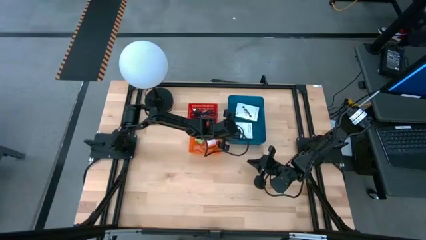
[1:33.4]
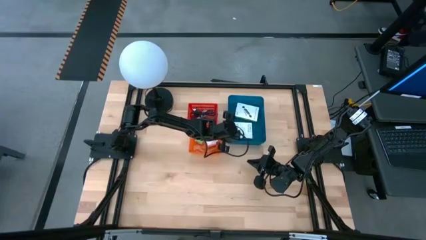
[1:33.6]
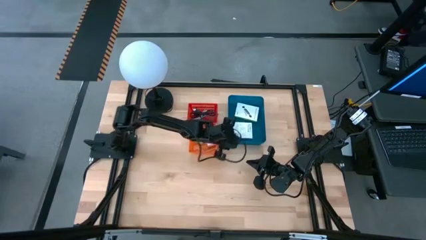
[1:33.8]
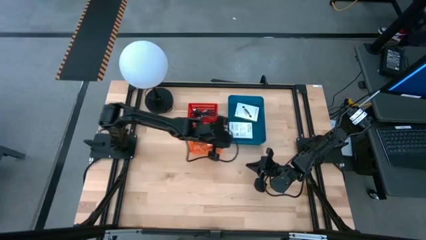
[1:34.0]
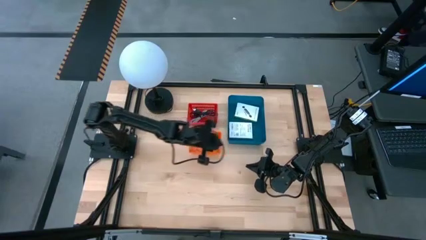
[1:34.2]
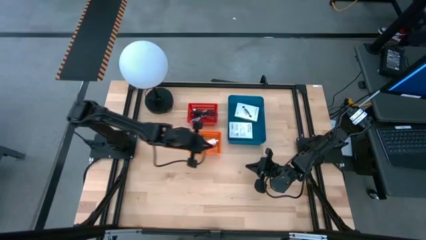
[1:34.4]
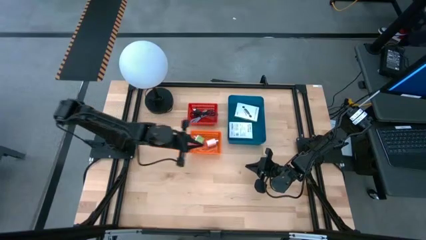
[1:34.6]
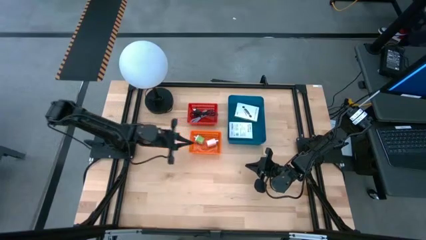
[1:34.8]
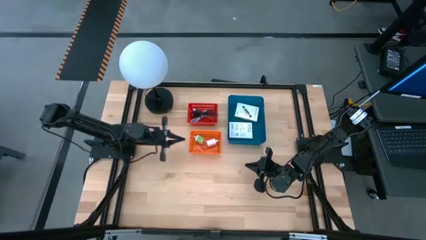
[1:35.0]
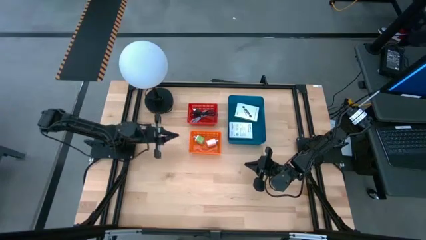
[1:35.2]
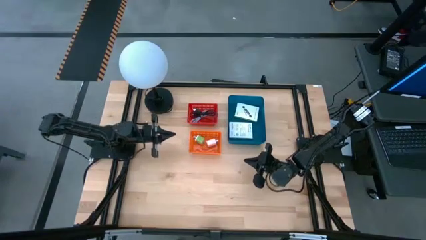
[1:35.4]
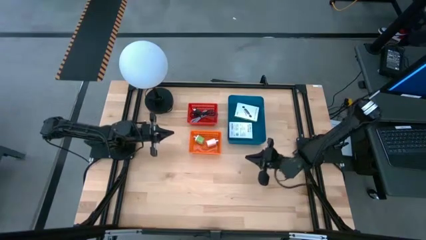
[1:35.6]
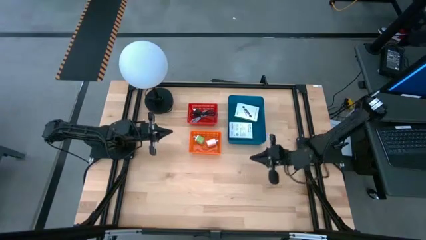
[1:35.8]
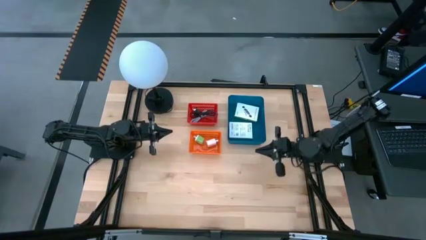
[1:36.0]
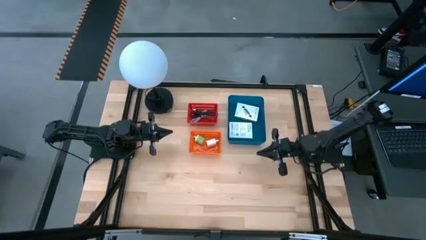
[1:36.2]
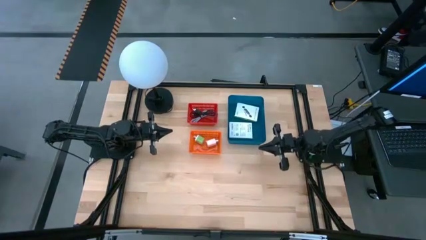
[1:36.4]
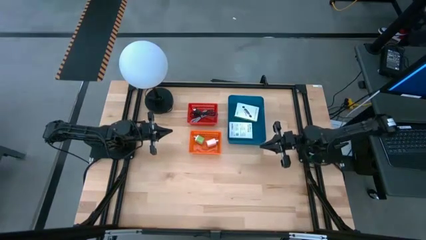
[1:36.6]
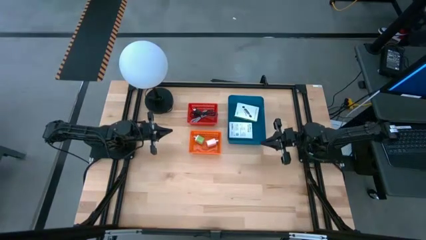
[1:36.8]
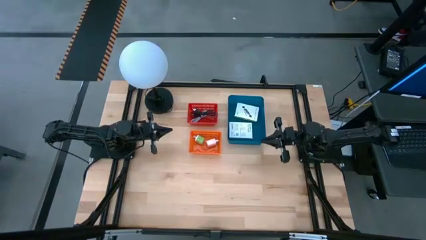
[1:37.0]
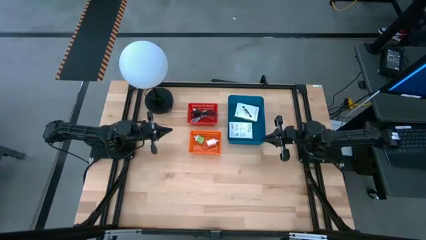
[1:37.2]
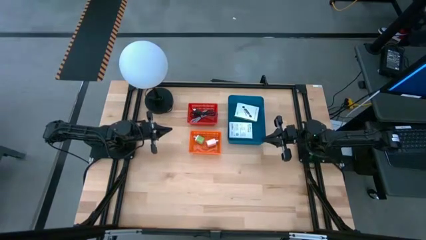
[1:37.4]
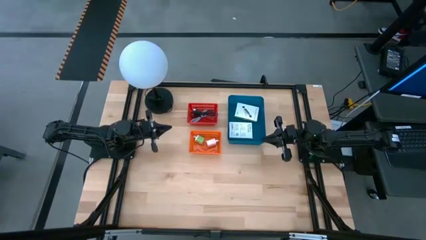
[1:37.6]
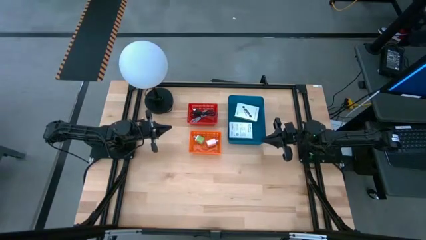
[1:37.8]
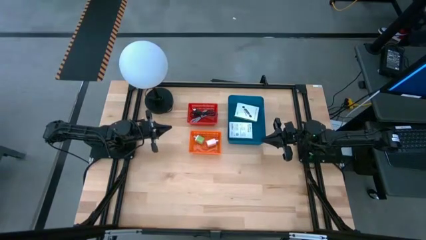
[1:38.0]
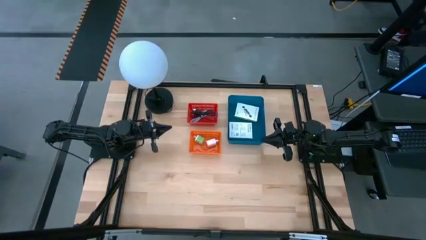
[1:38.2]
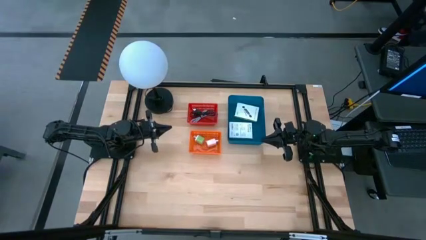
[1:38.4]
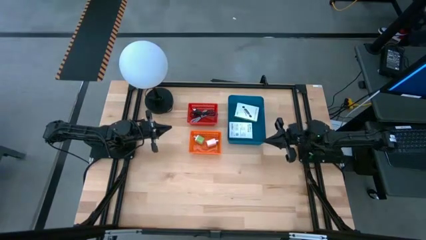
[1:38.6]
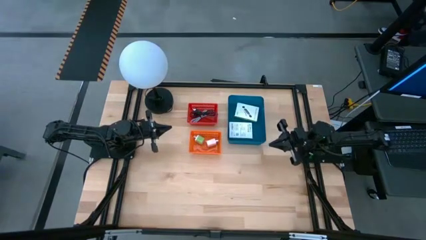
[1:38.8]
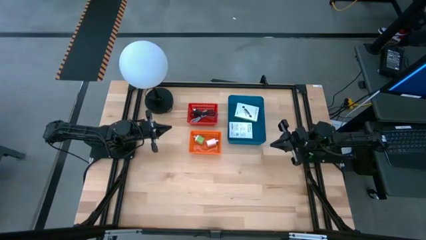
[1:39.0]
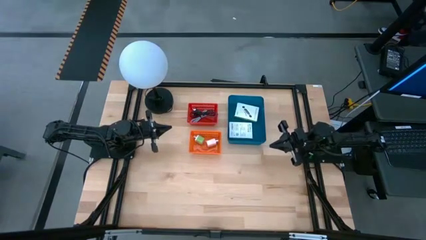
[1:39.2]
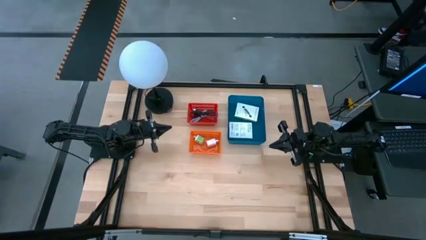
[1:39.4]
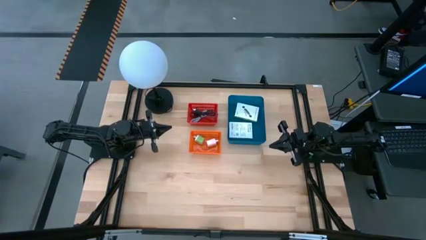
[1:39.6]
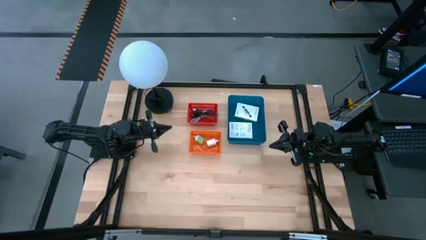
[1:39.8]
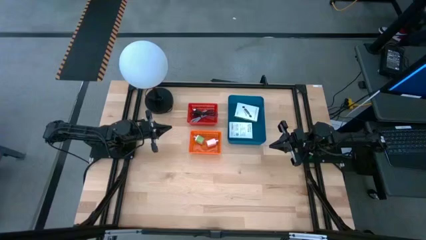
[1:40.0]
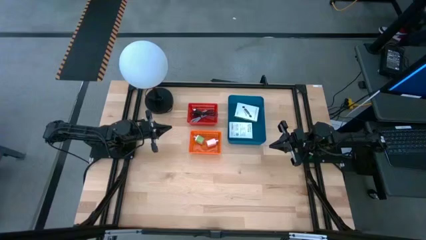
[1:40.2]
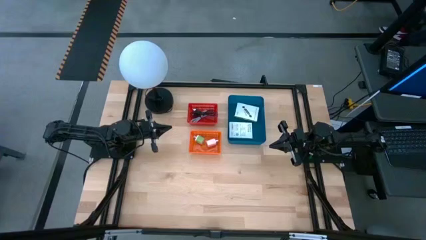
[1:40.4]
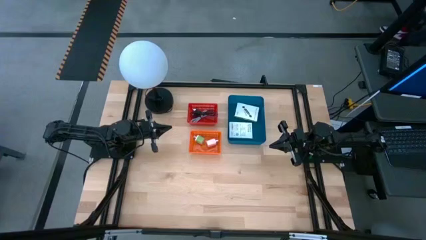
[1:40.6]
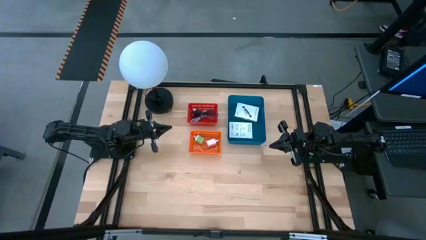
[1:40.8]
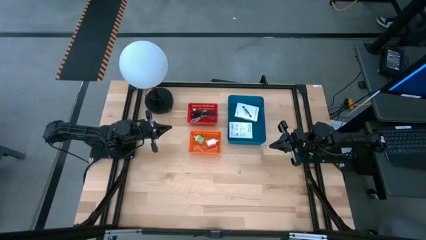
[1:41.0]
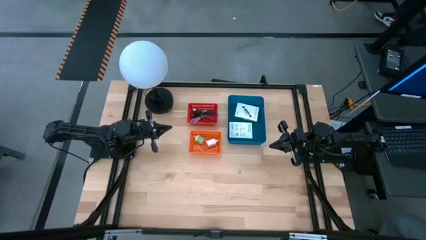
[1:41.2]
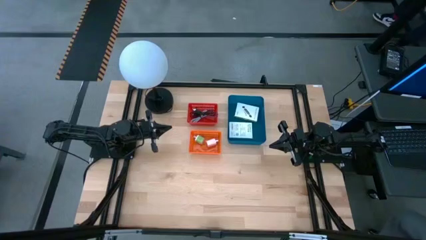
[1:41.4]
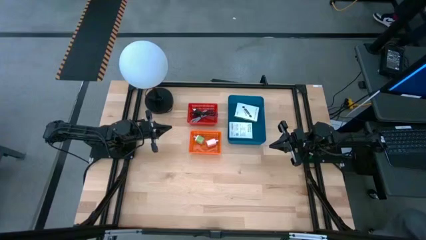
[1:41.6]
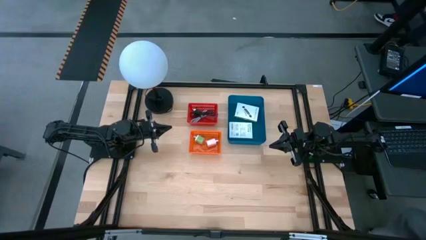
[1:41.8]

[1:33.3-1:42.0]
Task: Pick and place items into bin
Return to Home Position

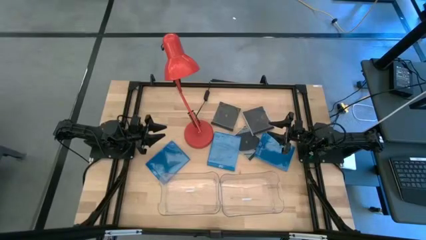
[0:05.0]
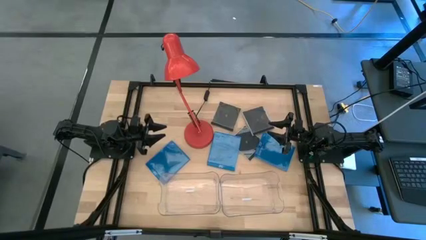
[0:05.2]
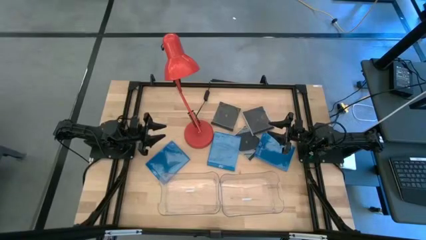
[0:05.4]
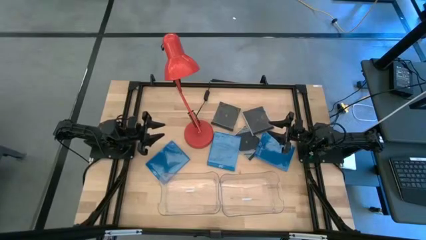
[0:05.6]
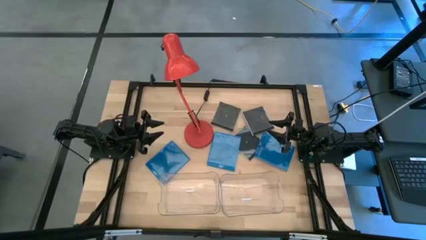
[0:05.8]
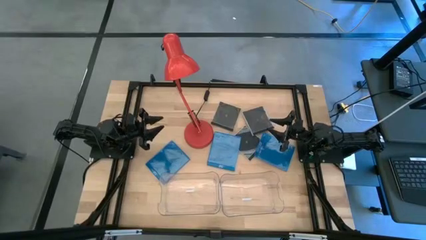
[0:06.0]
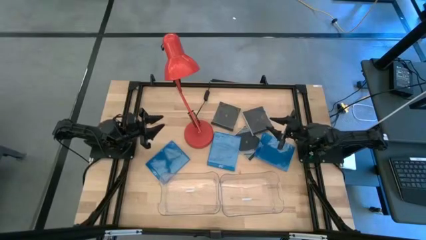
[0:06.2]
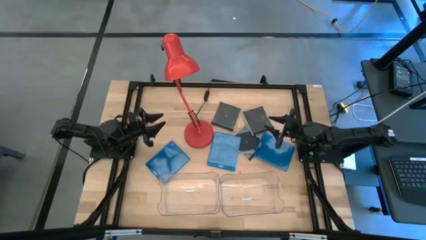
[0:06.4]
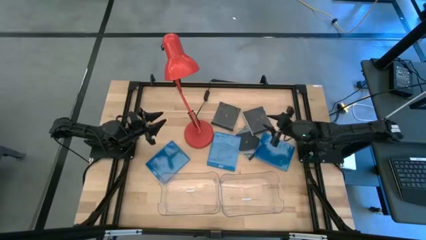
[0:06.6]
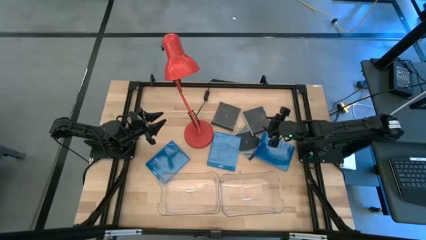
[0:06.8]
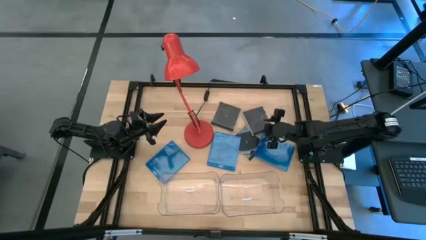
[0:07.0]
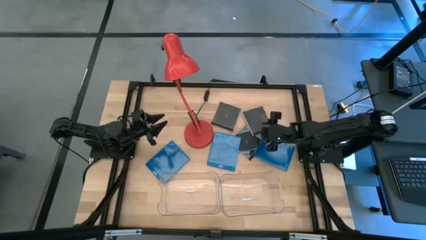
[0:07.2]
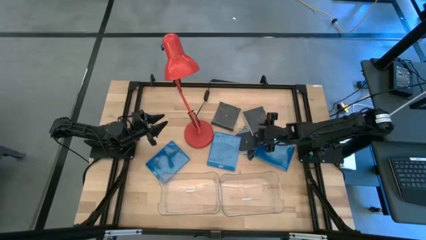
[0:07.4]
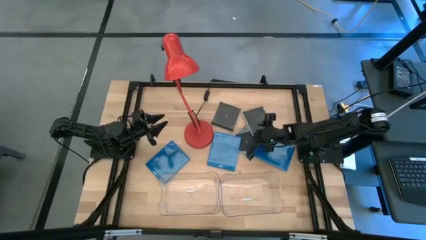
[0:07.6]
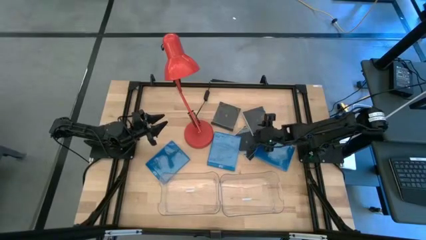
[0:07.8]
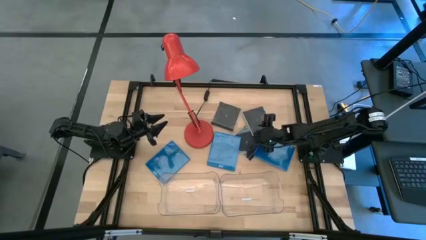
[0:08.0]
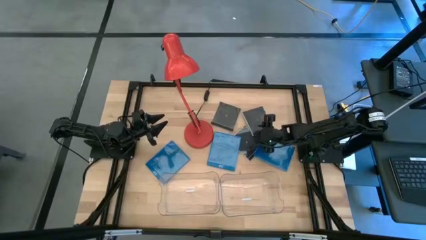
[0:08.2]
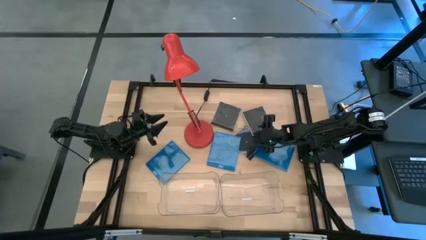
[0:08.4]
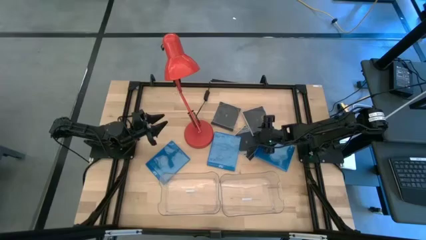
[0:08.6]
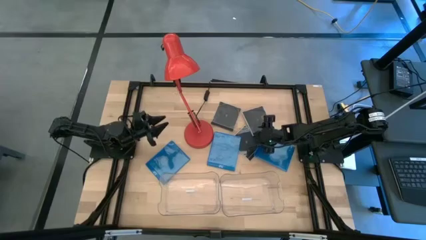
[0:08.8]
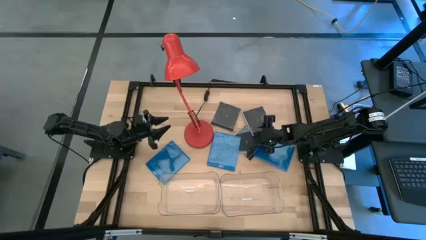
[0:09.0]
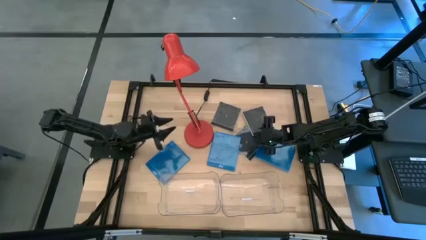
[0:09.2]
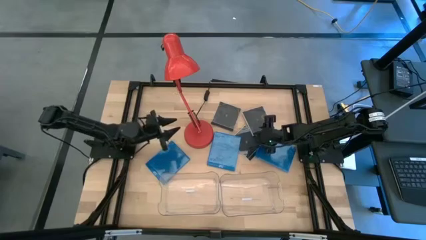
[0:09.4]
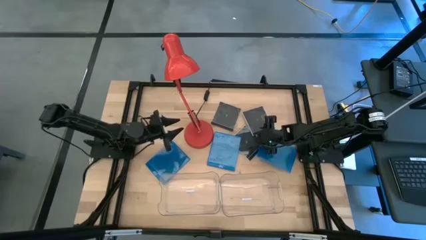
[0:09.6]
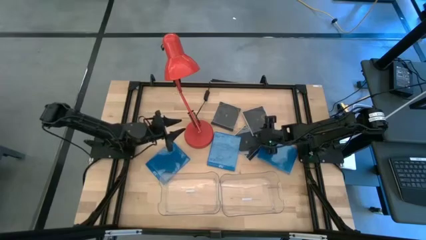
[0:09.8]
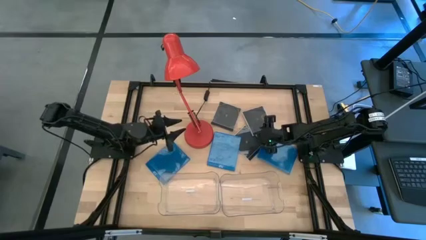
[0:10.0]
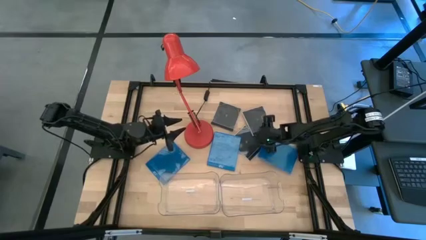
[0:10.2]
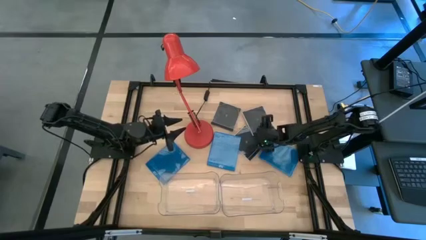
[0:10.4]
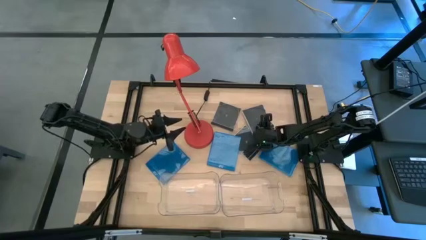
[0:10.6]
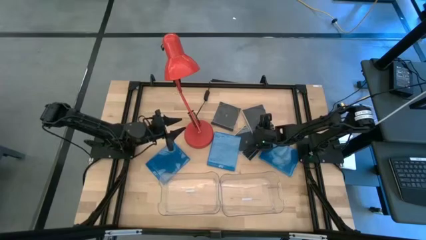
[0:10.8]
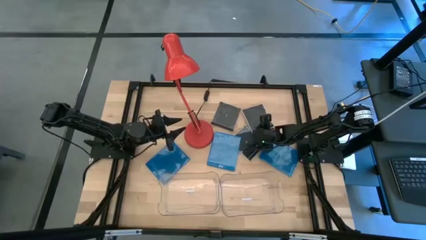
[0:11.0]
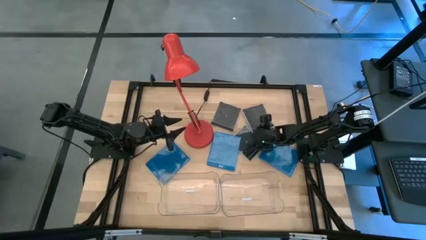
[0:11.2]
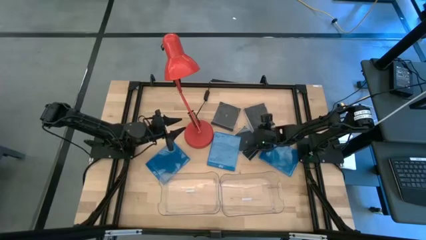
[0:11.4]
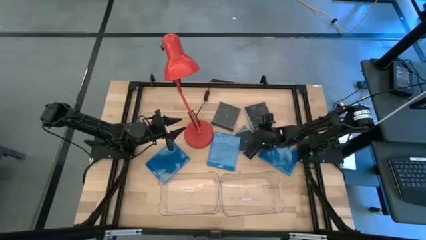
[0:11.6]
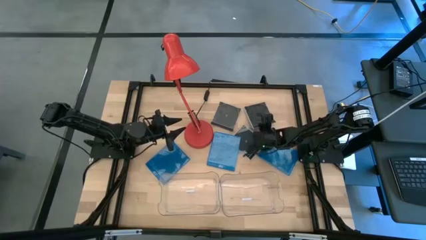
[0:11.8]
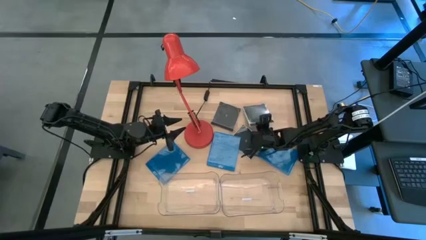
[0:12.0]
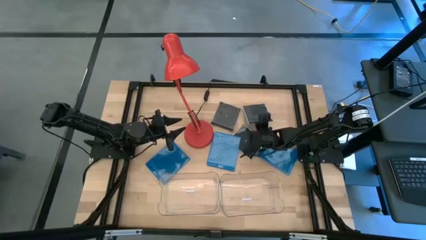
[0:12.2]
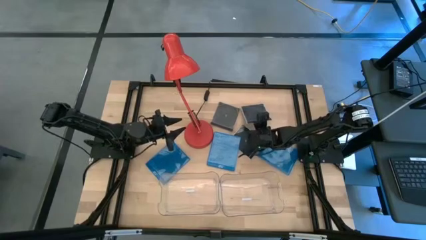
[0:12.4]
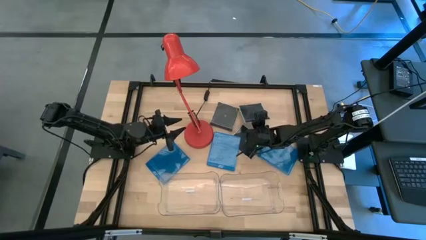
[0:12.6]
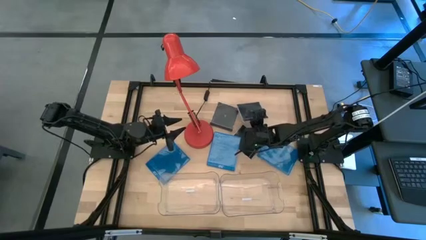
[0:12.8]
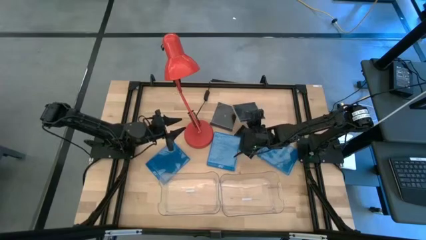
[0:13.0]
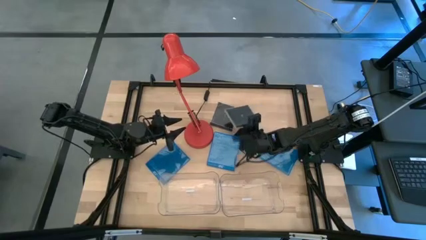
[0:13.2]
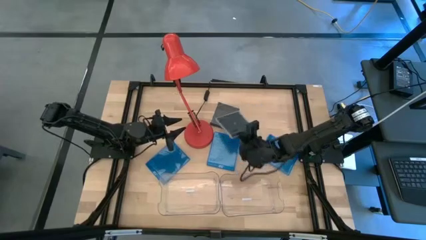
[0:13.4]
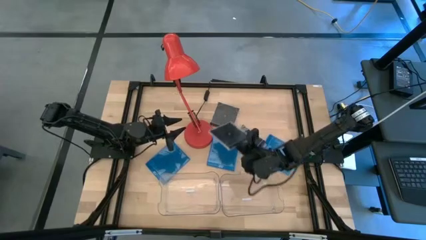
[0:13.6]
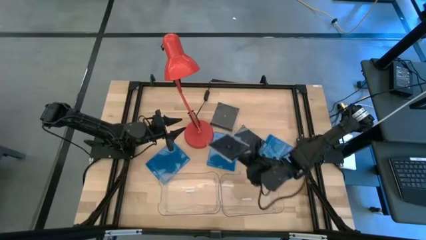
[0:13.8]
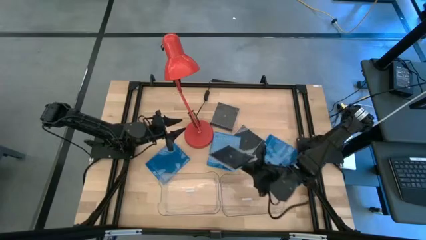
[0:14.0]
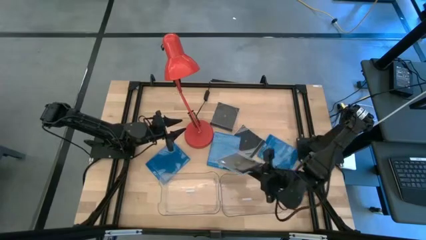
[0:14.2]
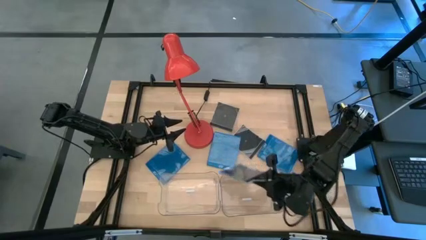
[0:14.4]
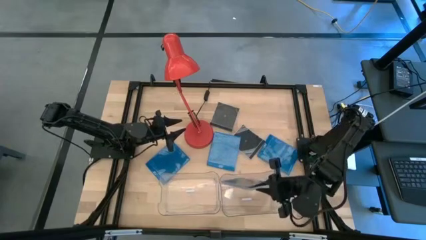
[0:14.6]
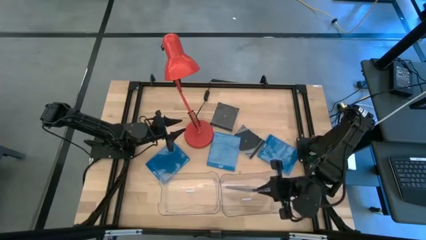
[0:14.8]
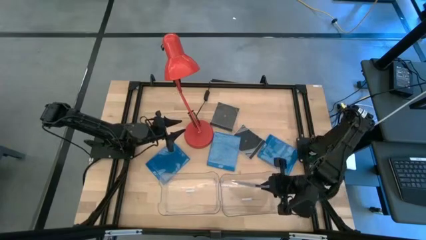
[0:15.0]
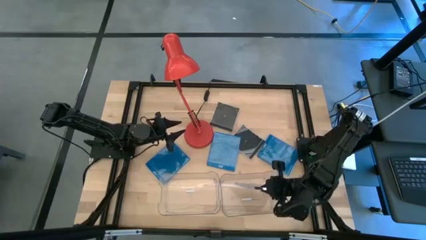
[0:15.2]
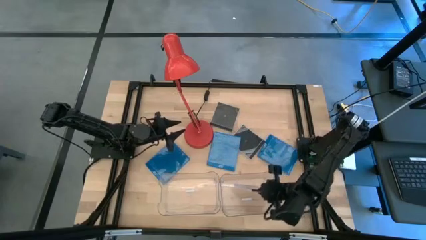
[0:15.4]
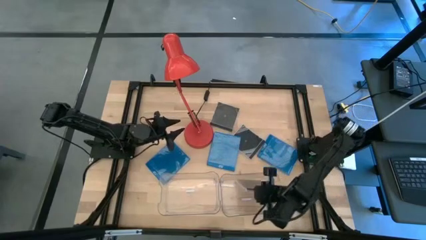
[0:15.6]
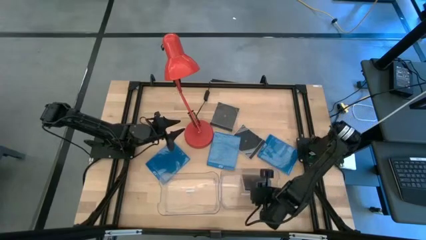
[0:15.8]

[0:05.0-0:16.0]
Task: Pick & place jewel cases by type
Put the top right black cd case into the right transparent bin
